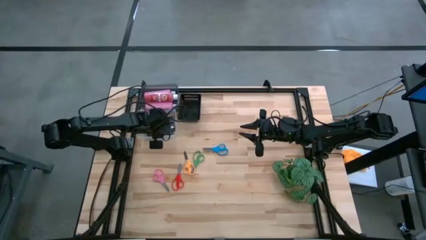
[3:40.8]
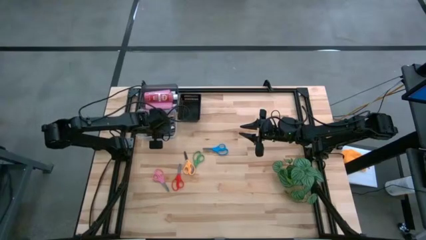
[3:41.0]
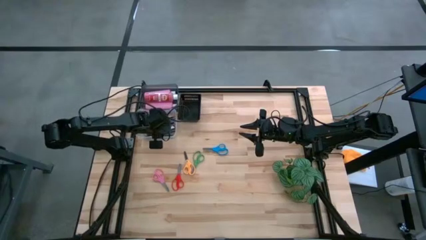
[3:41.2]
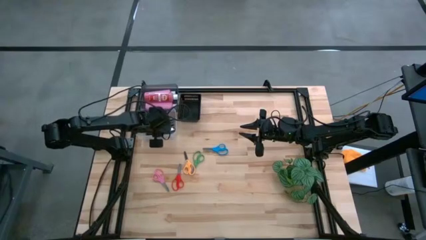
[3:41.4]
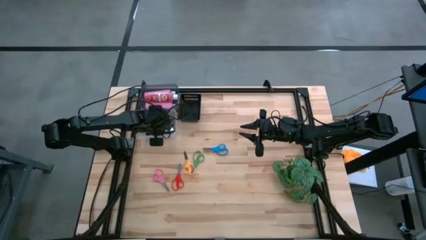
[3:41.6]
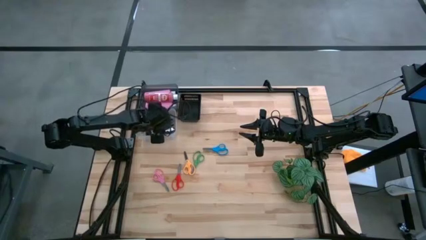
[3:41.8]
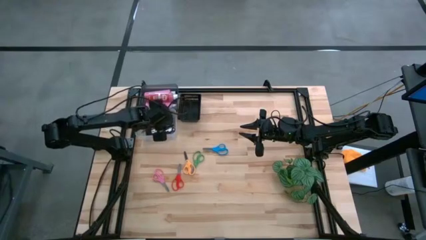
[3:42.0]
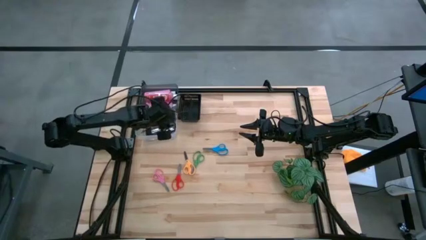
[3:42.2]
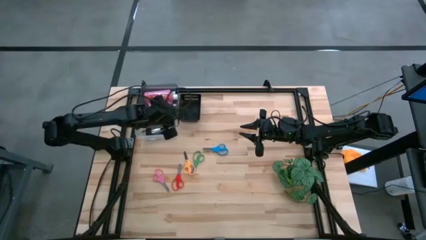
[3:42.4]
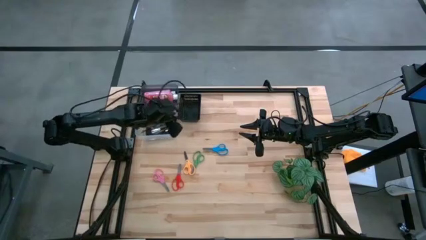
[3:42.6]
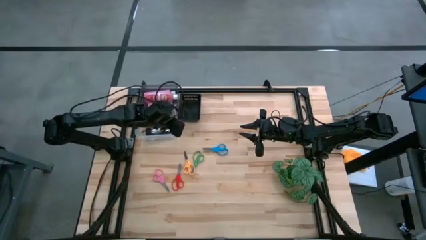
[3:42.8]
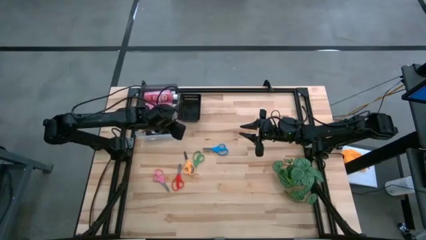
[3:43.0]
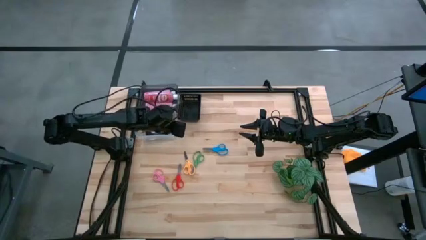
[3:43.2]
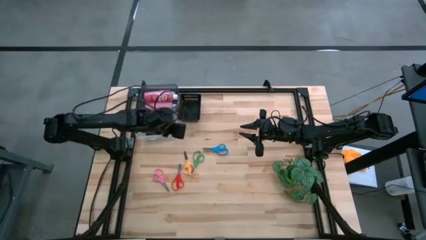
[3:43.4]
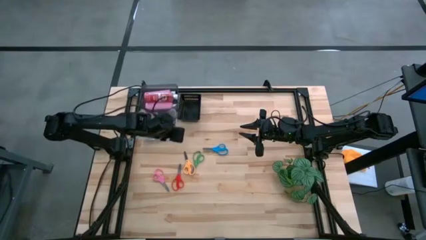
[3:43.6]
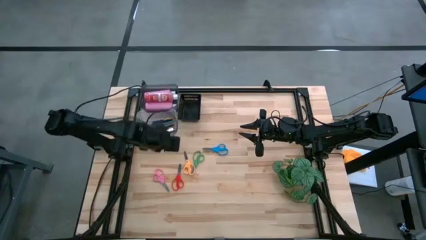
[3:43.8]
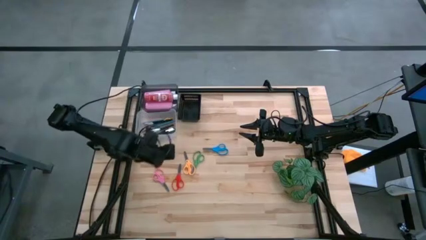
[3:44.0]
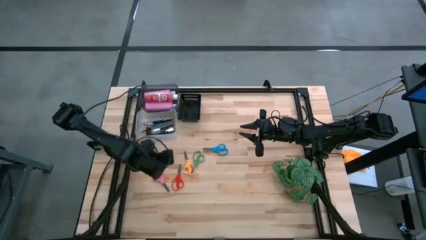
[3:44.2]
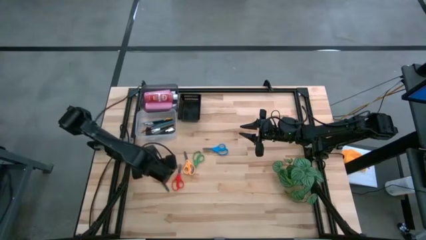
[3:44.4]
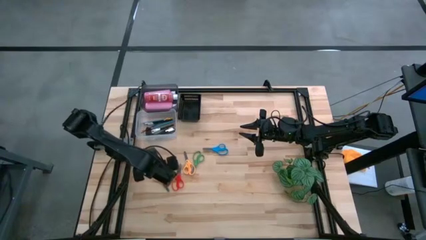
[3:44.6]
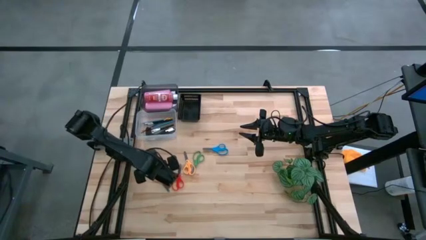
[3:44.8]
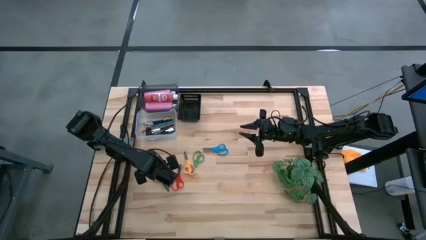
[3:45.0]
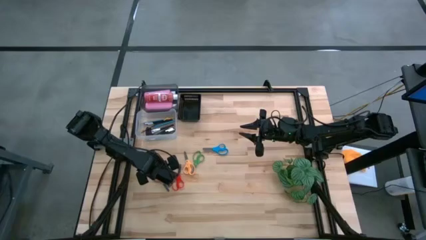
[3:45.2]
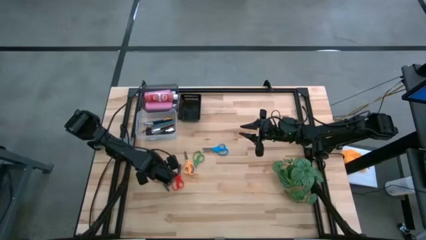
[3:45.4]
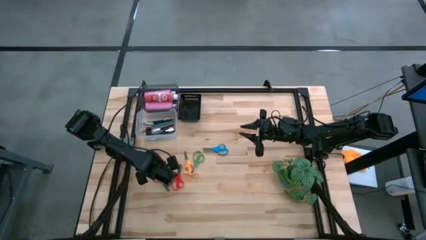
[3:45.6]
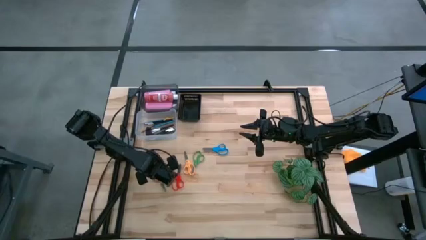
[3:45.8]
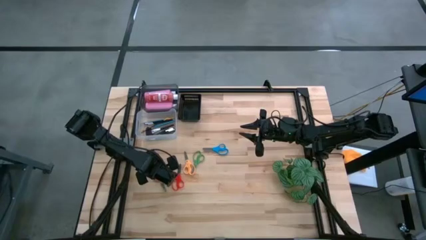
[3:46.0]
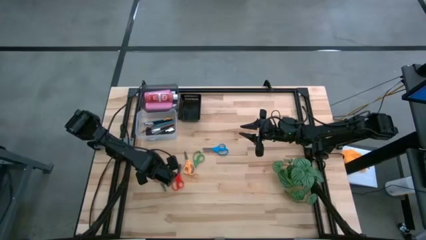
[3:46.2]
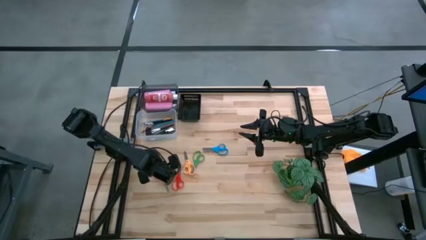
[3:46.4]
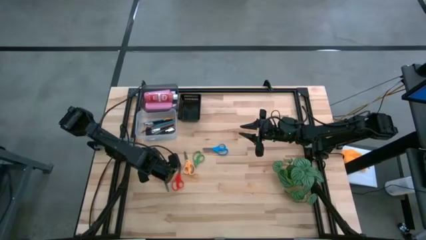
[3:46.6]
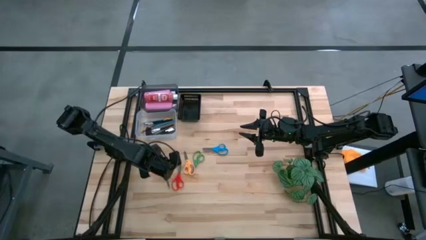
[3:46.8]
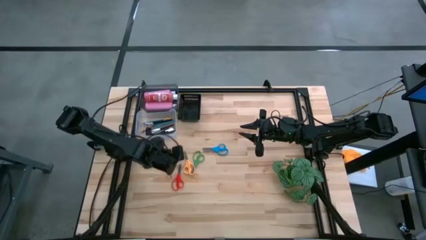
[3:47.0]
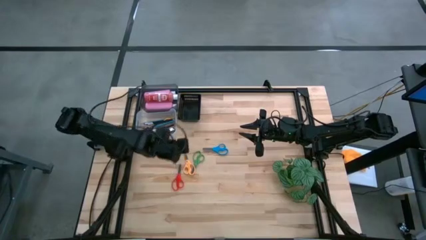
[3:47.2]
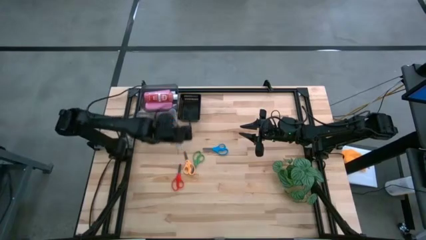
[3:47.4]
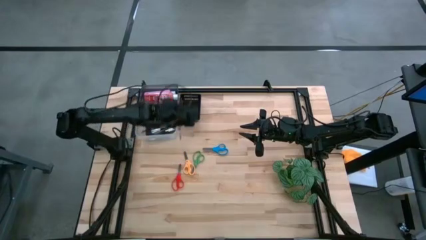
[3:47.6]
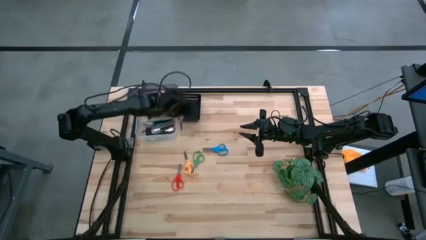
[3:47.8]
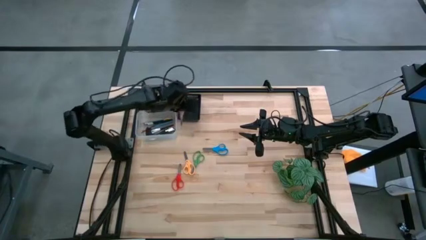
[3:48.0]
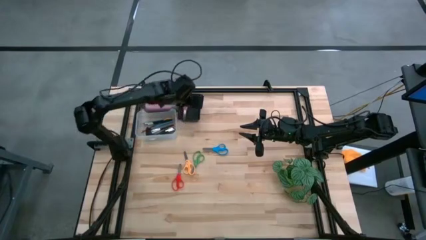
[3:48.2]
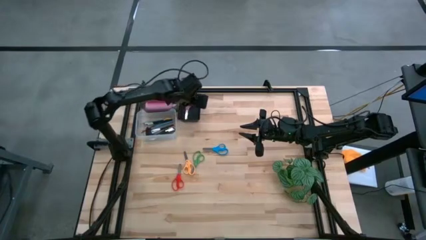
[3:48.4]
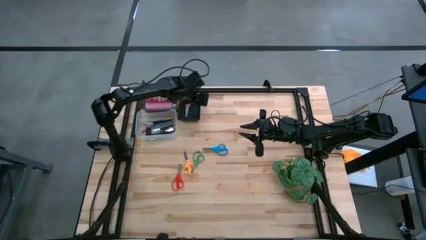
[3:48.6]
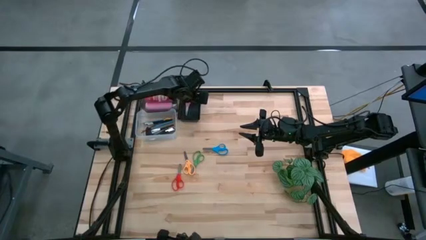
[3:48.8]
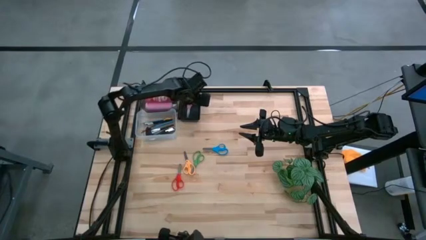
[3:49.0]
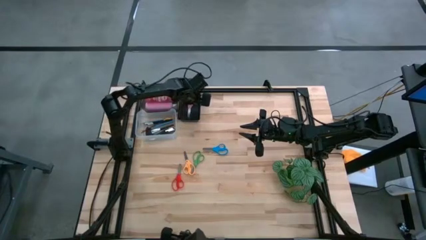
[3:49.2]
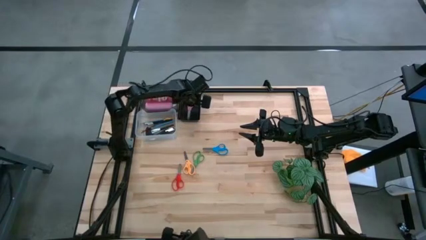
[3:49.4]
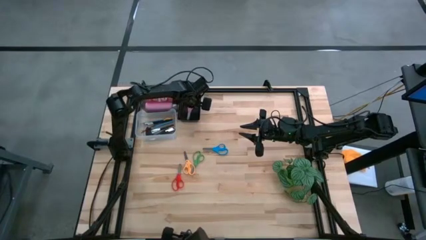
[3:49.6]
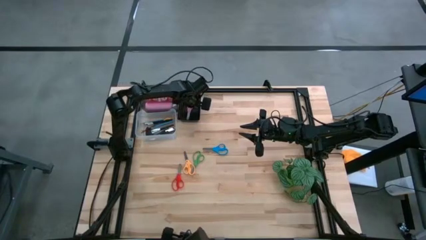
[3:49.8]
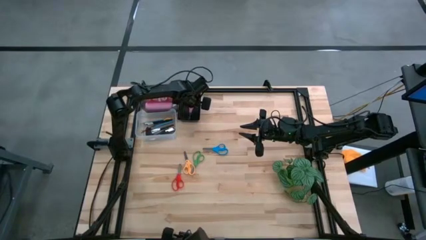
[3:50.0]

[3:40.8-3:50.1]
Task: Pick & Place Paint Supplies
Put the pink scissors into the right black bin

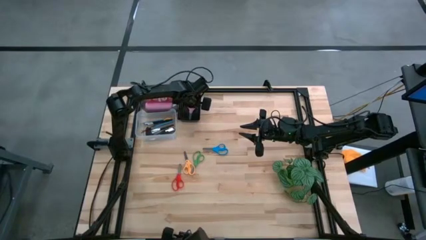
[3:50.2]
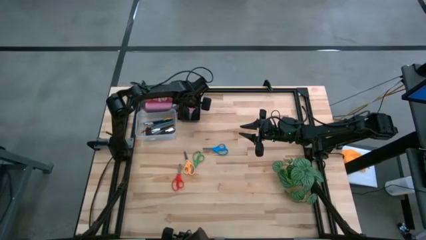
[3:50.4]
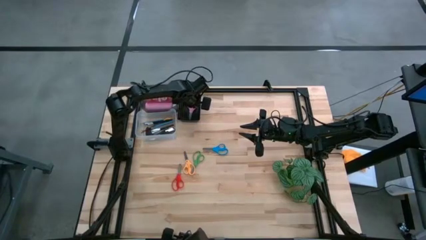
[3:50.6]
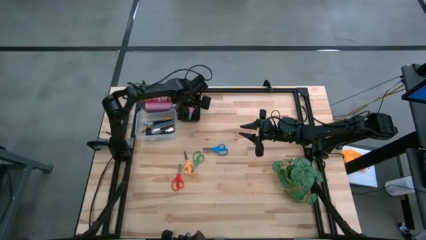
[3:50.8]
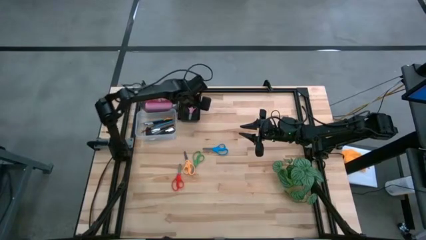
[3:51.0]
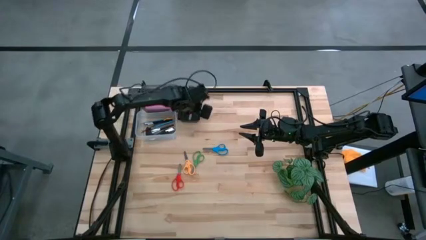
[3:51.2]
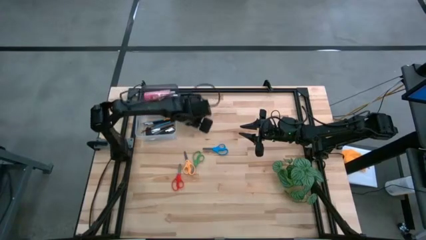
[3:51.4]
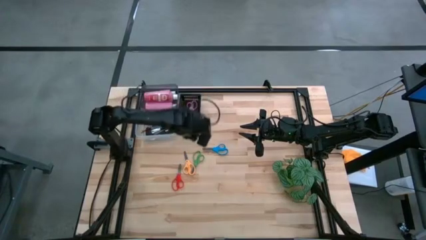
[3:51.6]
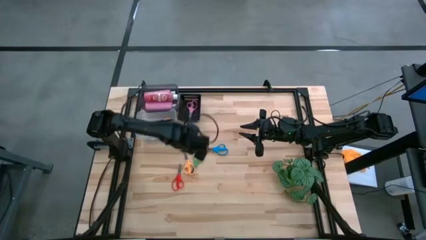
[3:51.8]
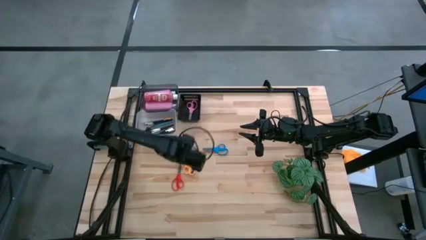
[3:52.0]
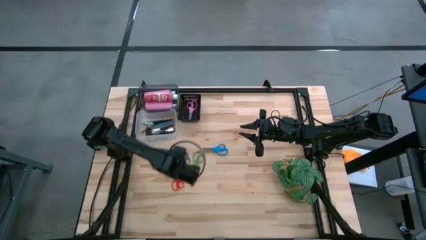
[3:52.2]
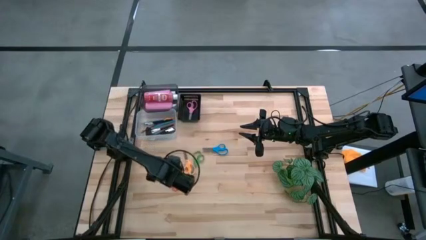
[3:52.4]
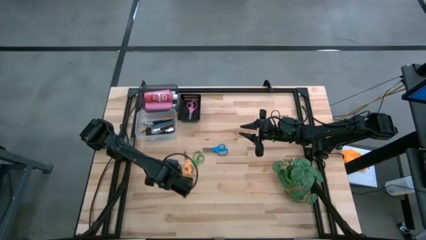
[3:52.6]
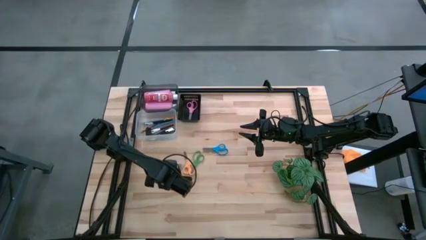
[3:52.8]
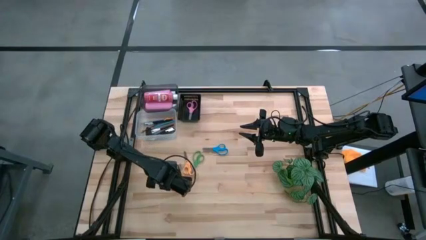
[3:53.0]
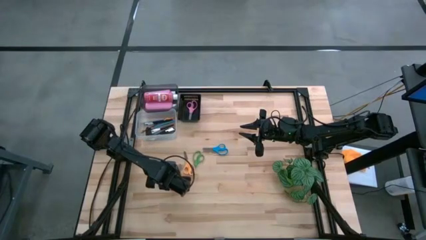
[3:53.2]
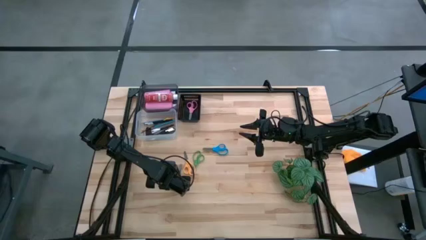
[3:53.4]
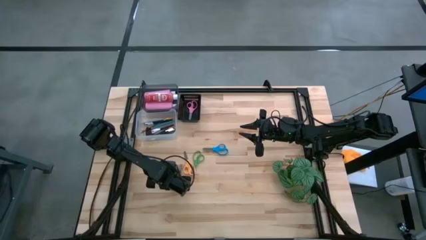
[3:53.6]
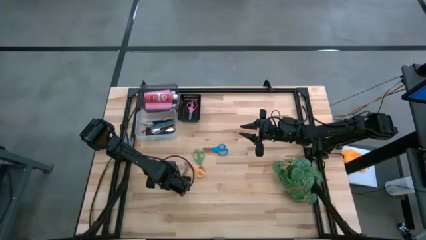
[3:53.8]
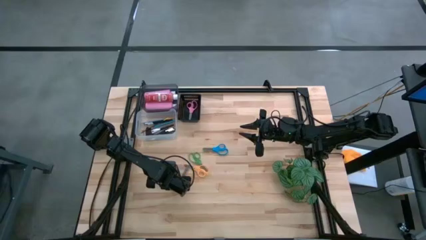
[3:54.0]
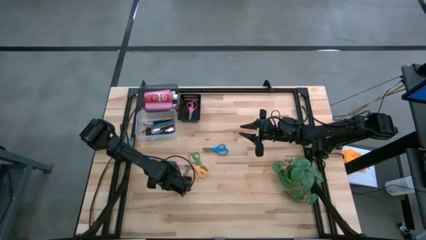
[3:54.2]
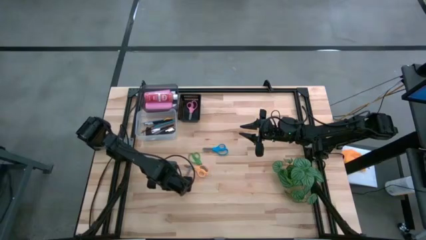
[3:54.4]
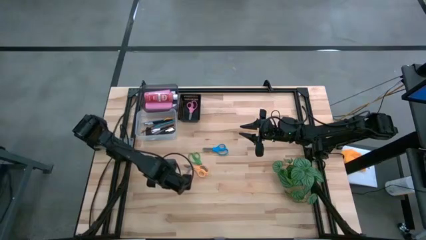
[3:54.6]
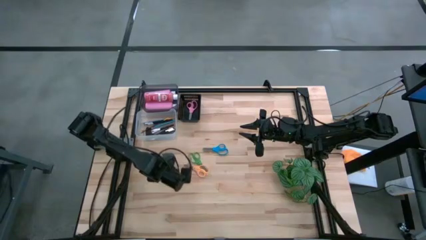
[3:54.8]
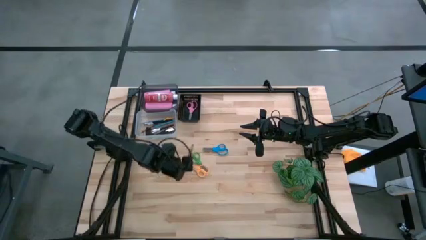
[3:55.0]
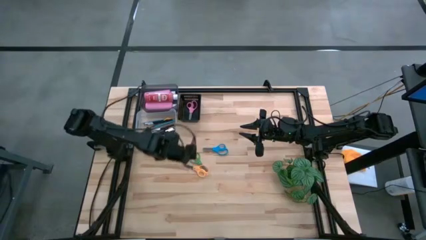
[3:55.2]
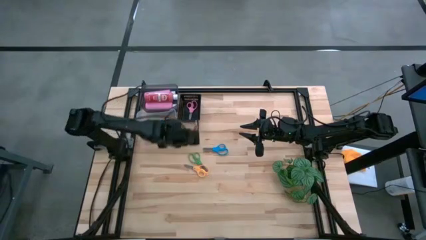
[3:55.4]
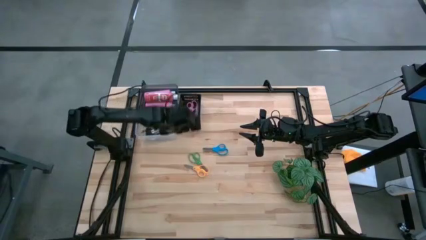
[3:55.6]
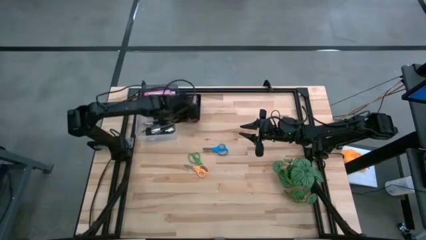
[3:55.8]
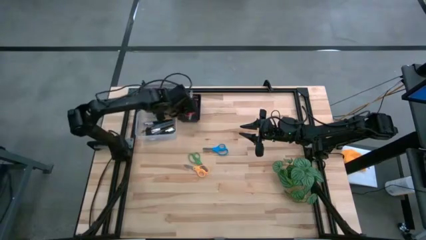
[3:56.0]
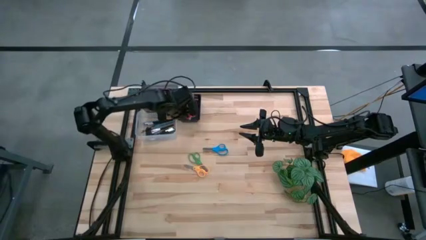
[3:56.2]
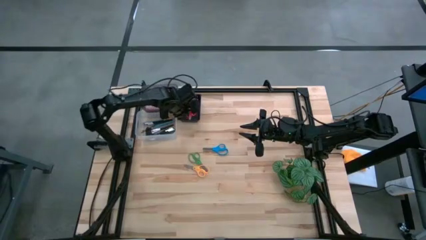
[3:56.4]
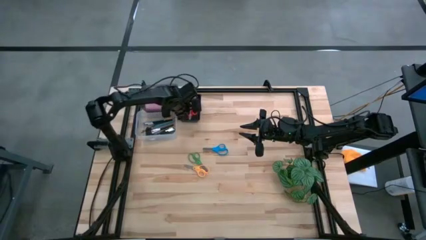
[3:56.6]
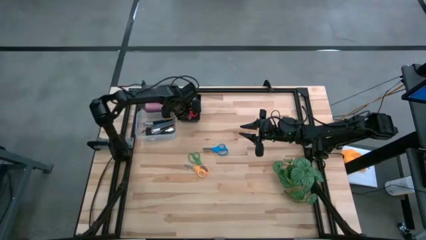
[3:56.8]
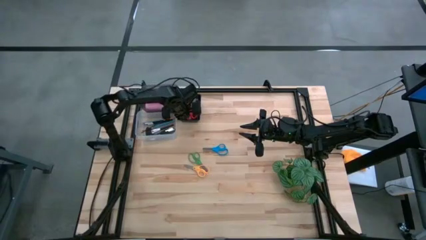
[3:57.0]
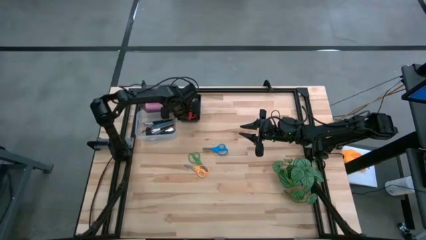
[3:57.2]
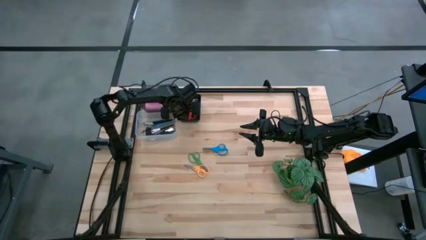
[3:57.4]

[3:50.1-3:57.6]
Put the red scissors into the right black bin
